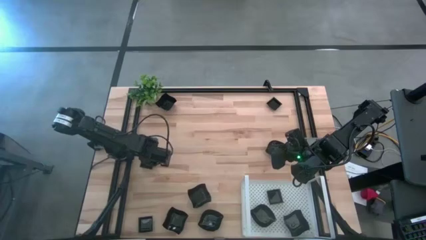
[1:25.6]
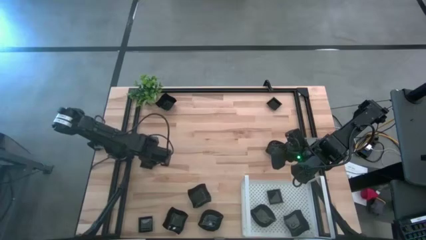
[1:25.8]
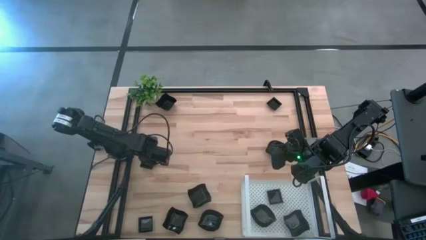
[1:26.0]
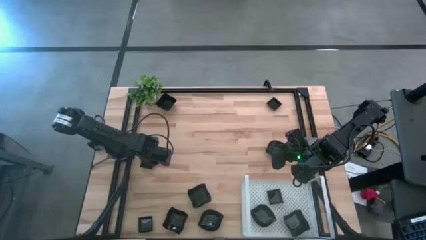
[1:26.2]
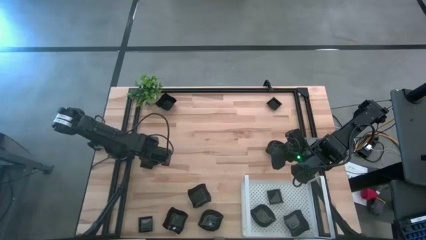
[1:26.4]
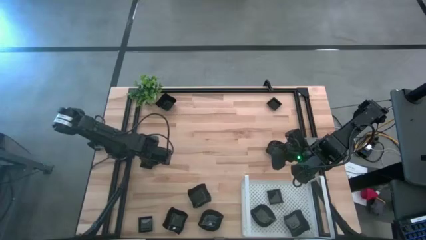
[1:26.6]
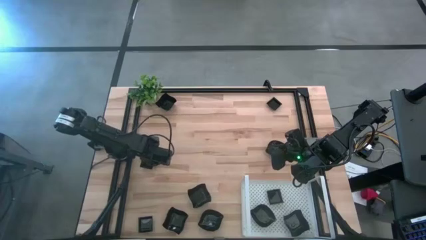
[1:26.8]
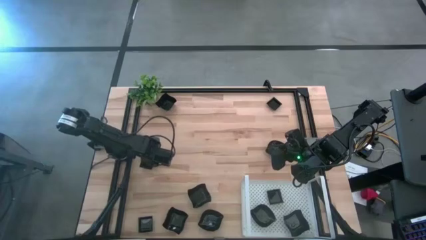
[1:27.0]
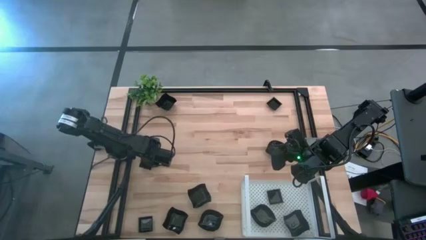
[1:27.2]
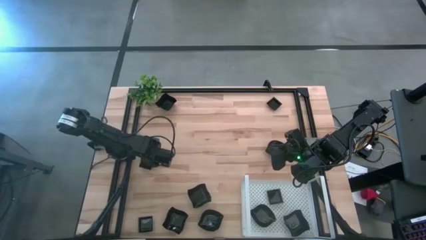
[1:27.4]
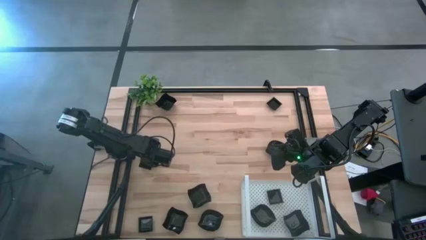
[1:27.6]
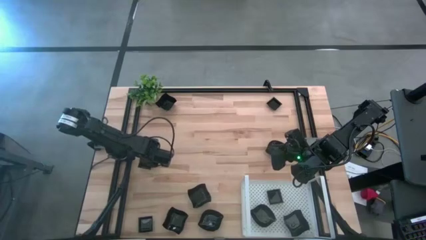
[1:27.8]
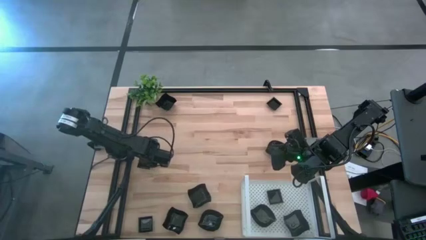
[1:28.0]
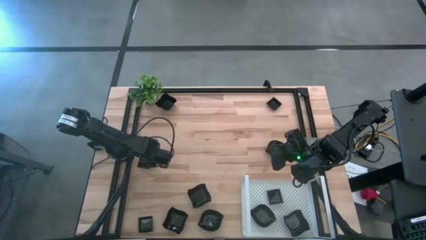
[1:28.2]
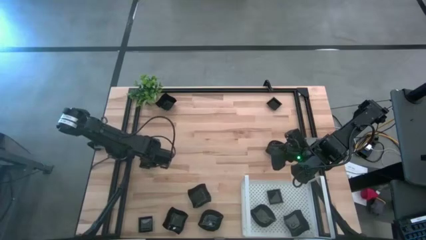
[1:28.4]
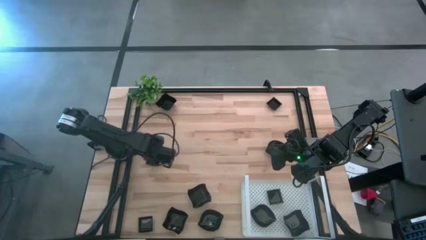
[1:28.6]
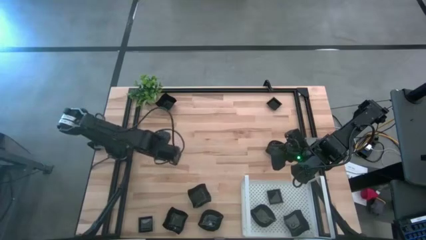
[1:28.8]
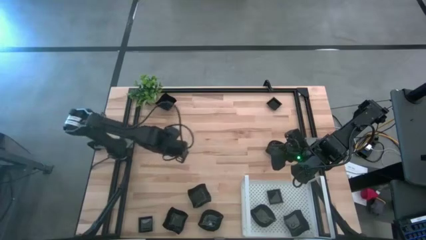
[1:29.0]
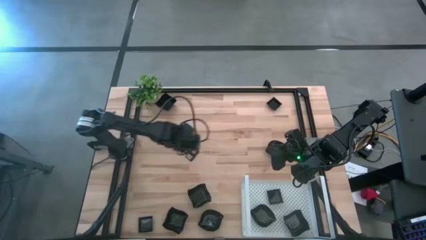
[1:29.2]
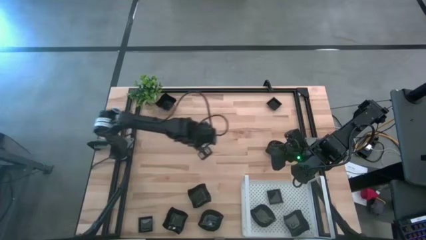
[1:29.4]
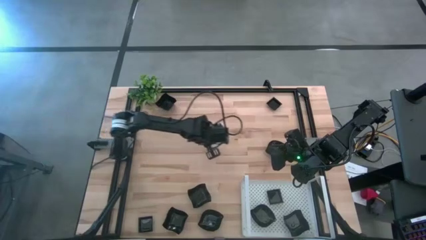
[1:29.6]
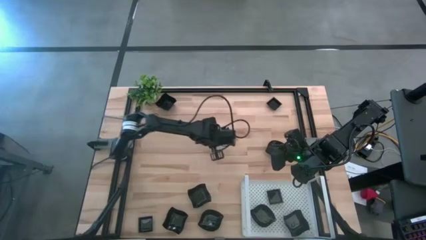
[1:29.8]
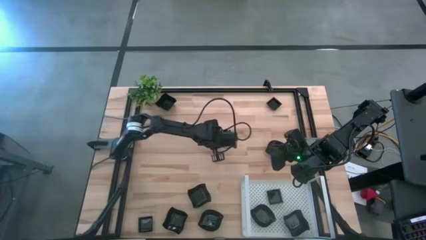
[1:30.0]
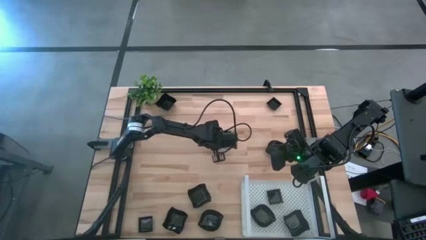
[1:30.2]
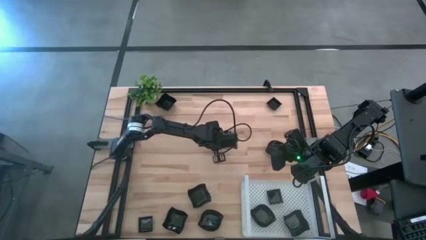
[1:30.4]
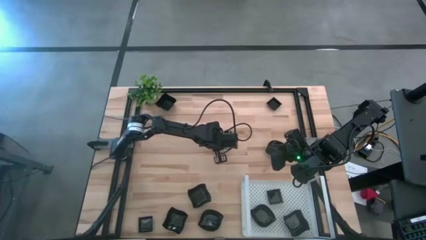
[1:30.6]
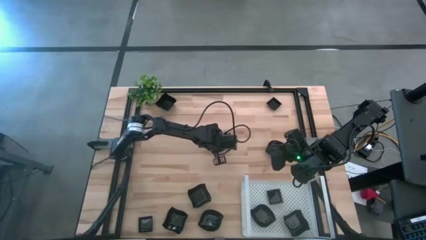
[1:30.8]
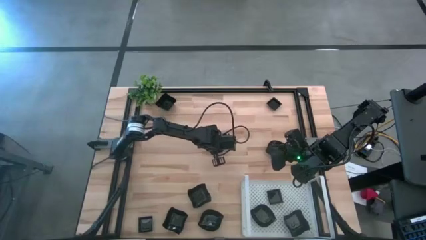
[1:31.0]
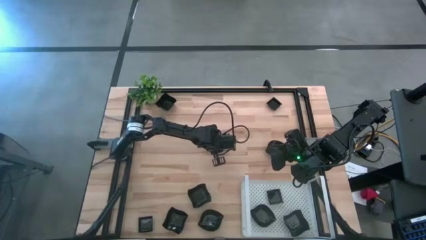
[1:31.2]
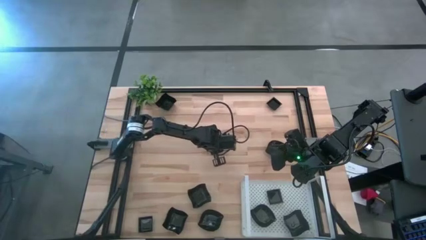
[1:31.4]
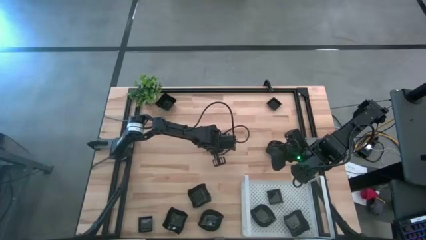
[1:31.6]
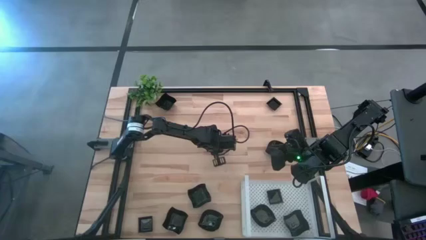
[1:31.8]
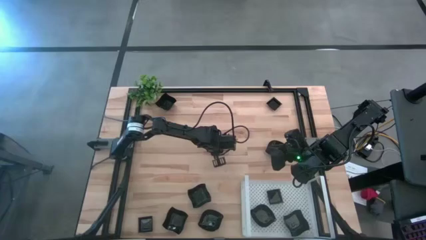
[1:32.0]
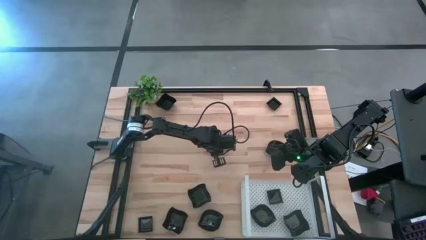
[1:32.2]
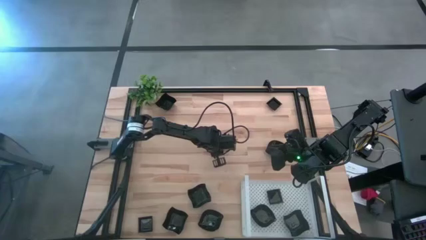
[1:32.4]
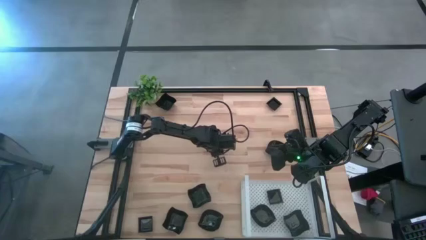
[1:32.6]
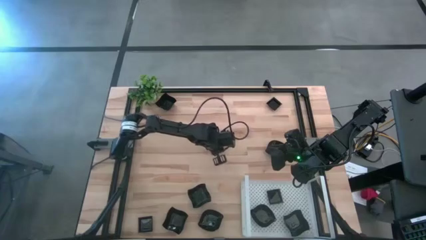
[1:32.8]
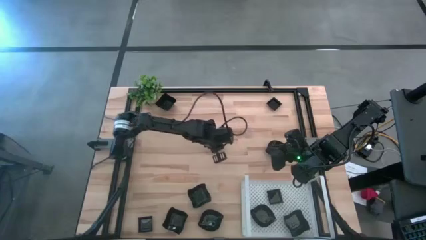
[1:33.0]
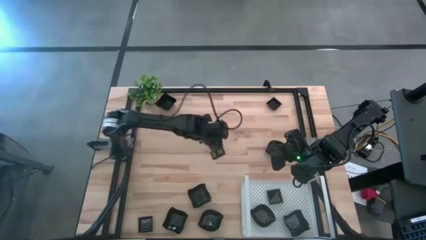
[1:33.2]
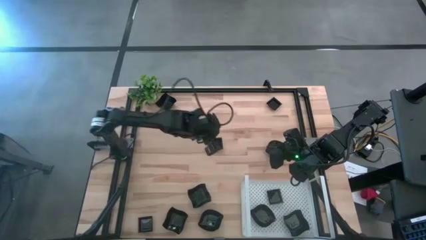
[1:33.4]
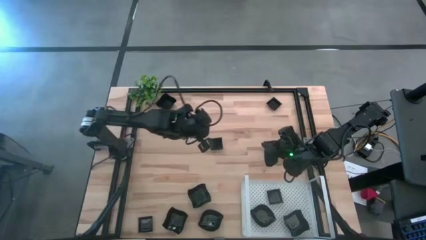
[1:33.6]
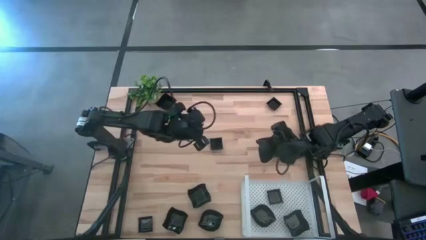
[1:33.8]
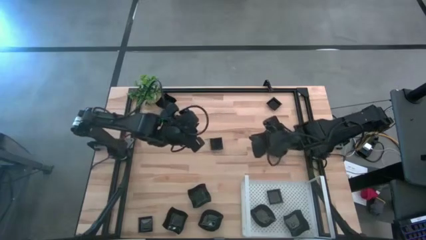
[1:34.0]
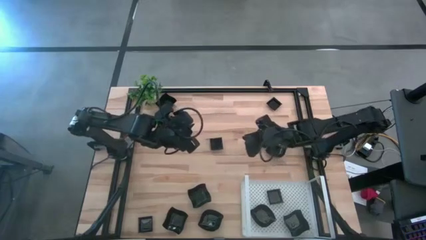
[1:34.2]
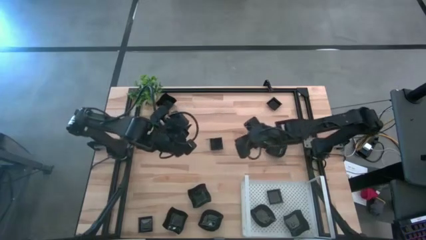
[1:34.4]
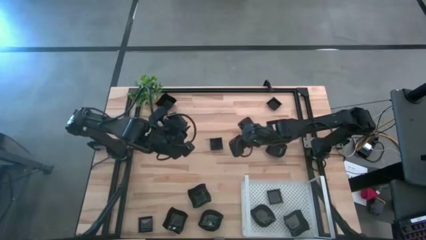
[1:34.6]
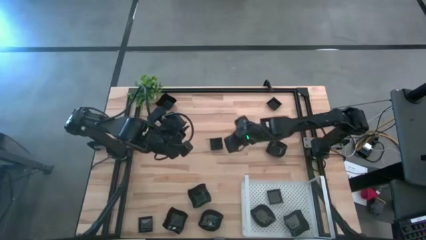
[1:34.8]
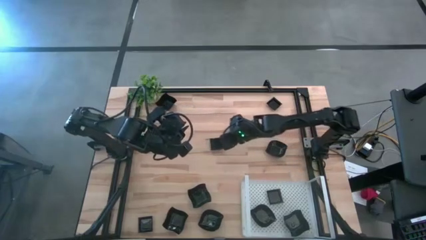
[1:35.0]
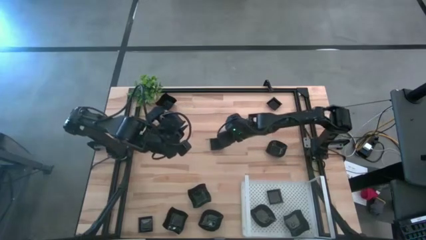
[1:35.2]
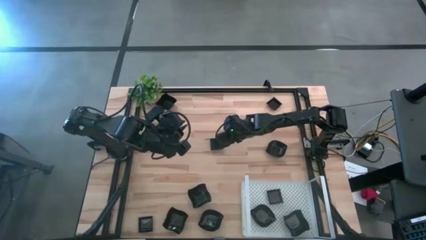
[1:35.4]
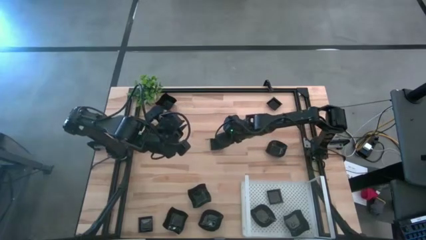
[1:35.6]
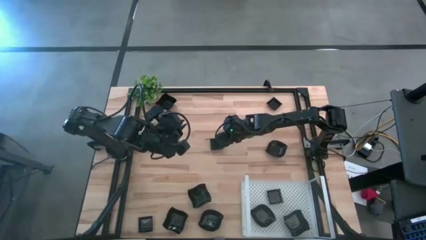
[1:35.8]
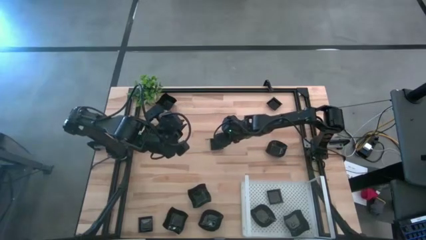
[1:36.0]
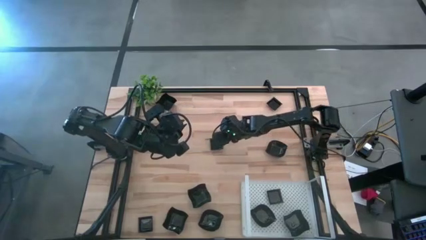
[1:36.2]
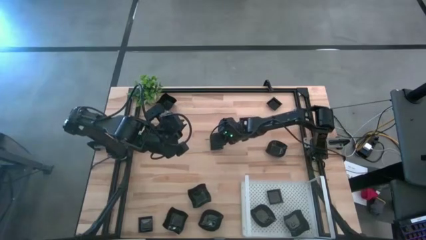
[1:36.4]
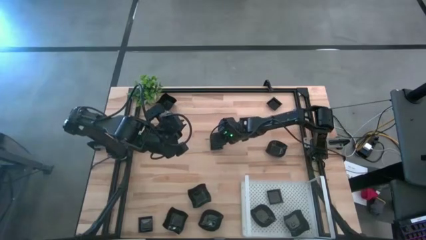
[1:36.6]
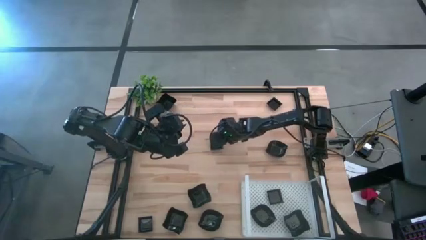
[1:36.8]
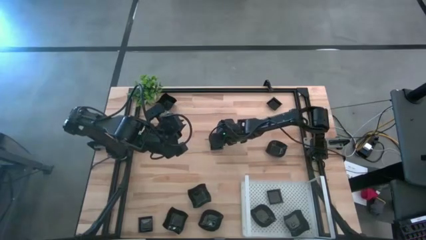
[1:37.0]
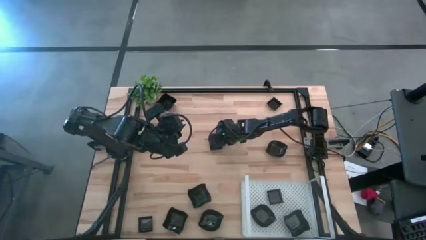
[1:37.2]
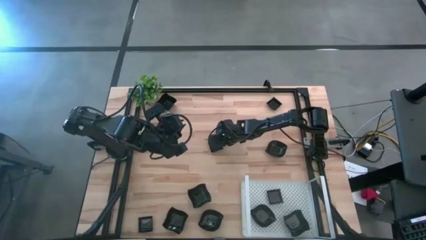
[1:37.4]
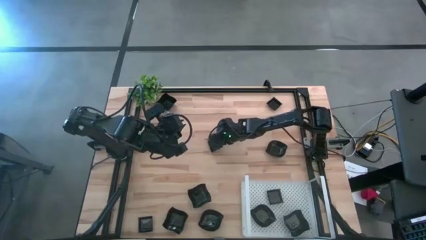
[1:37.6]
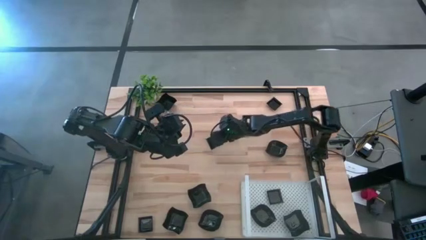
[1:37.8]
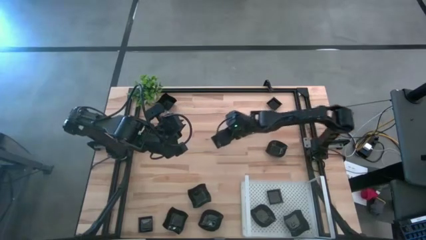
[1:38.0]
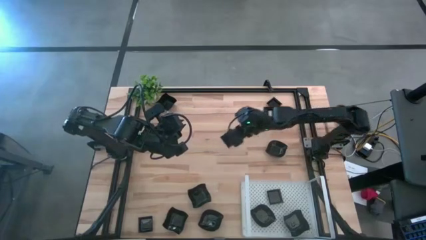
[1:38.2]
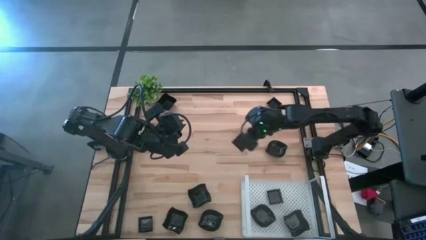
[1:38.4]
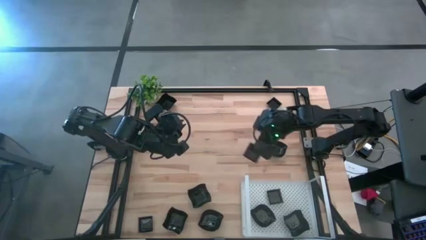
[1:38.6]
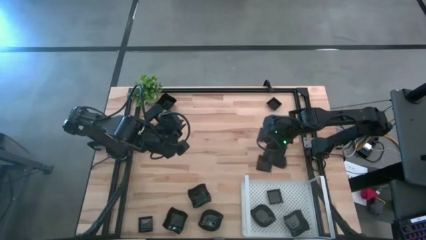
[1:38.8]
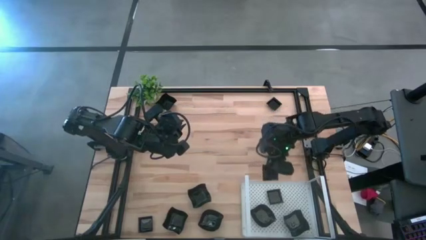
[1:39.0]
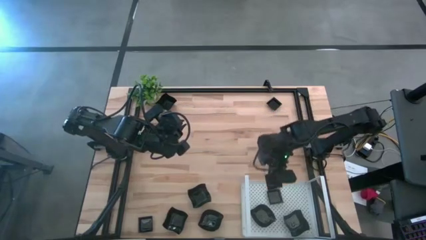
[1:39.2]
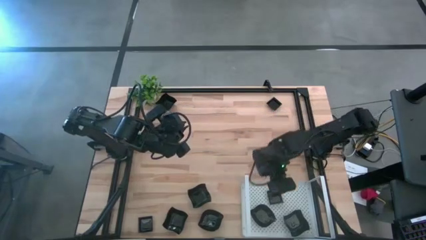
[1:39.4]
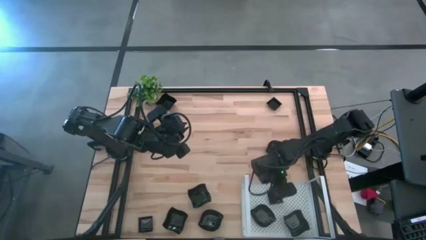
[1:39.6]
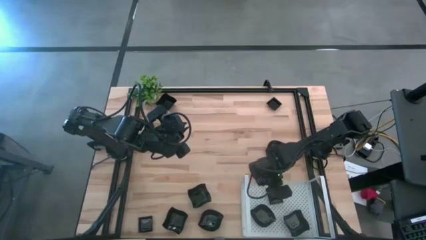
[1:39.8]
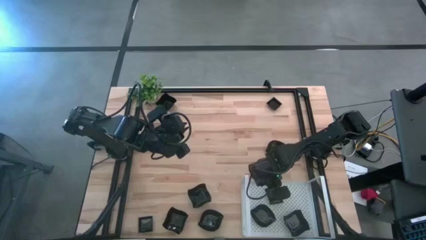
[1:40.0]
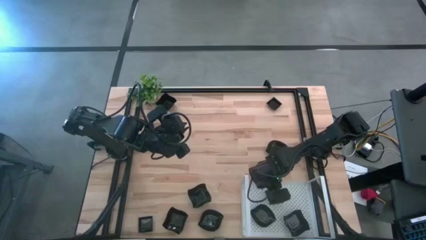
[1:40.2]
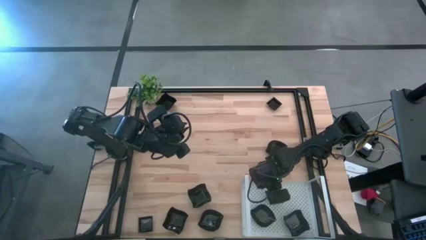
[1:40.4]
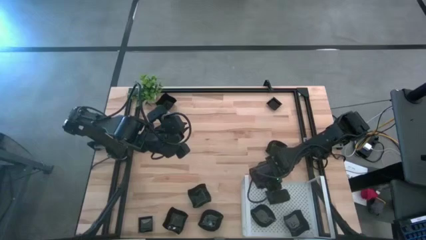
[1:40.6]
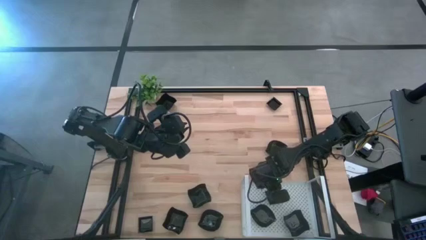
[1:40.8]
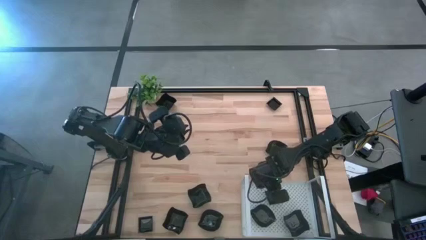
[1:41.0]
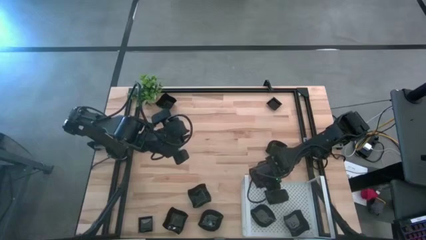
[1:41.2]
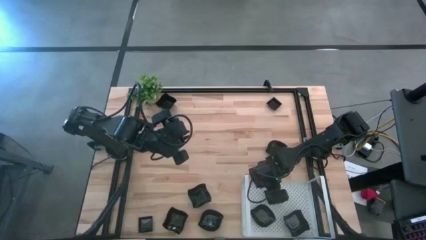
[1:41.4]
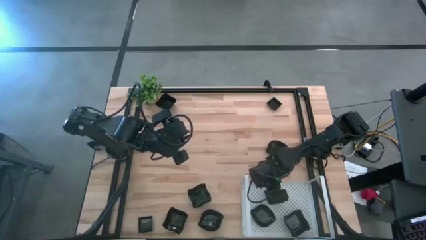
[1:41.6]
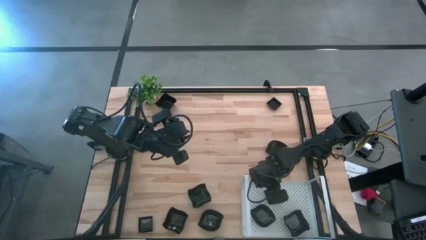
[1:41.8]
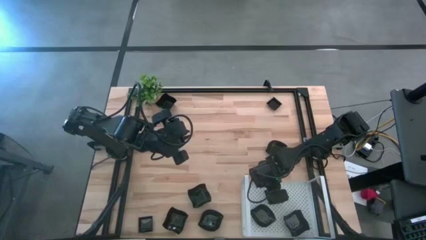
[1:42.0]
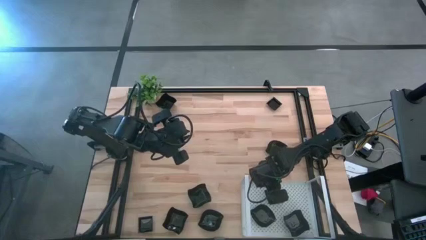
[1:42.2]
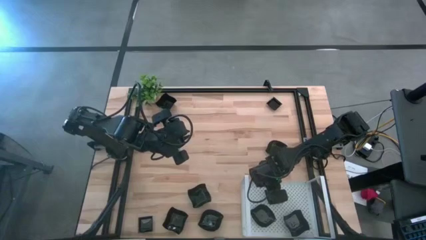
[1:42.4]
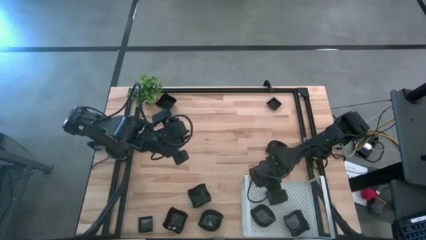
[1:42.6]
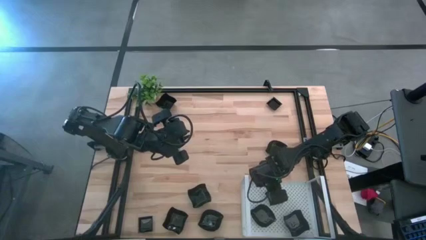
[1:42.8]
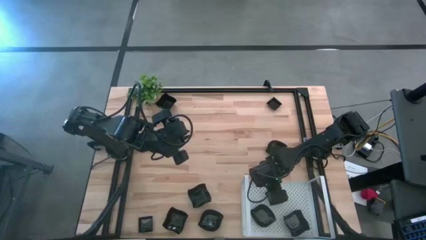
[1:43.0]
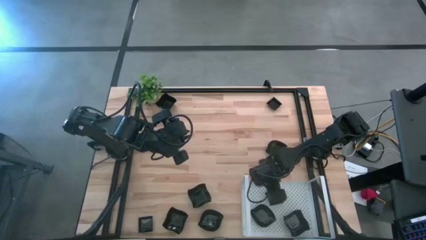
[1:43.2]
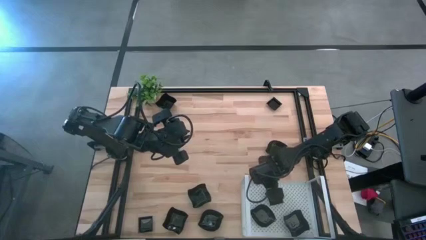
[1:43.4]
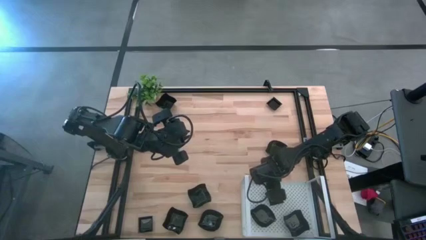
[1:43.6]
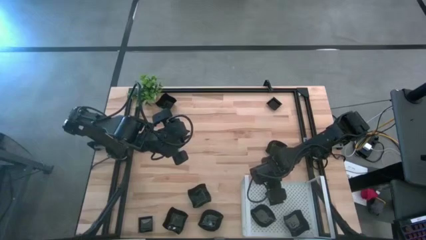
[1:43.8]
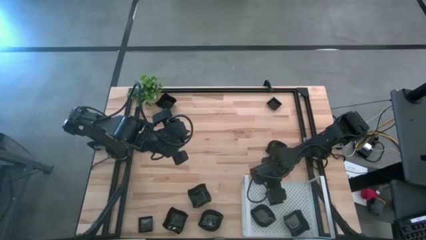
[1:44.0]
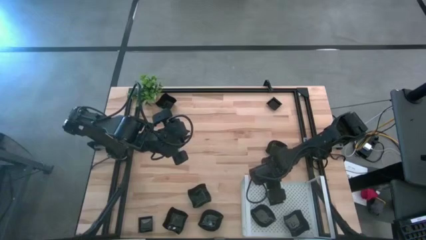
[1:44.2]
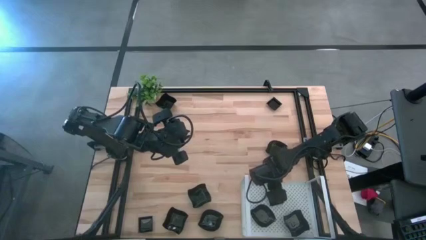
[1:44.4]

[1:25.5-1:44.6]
Task: Pick & Place Mini shaped plates
Stack the square plate on top of the other square plate on the shelf
